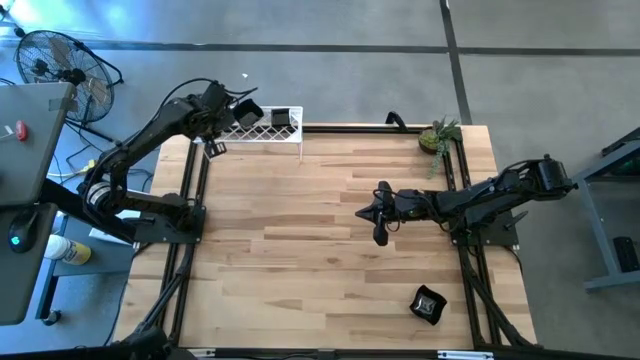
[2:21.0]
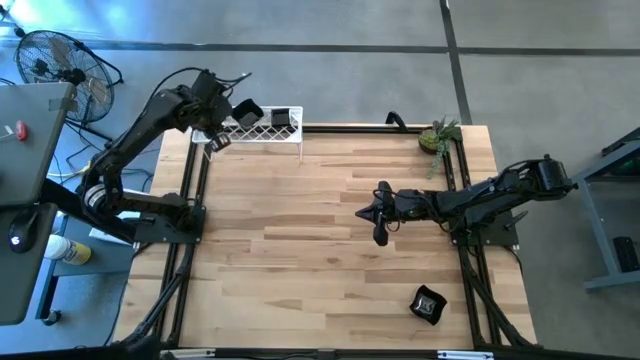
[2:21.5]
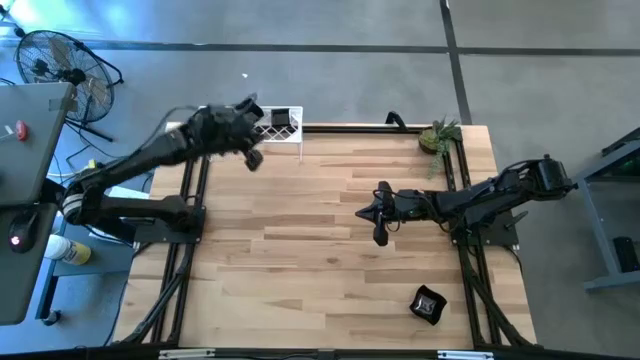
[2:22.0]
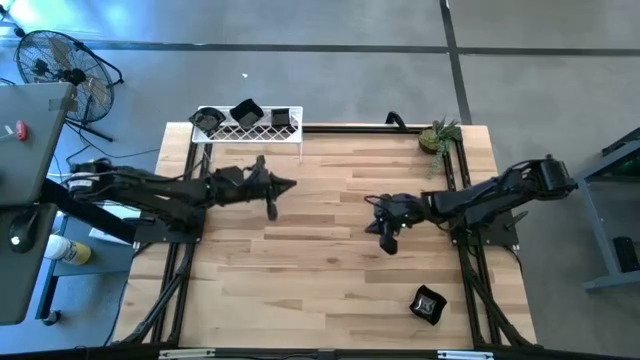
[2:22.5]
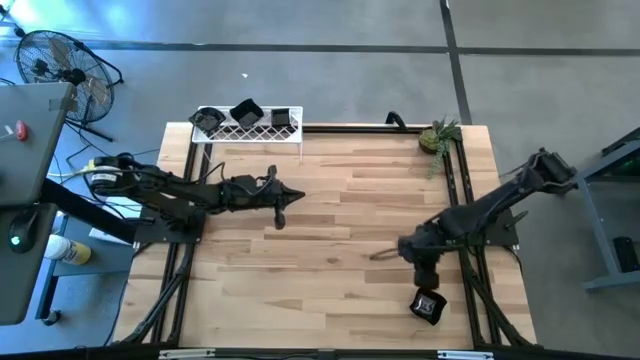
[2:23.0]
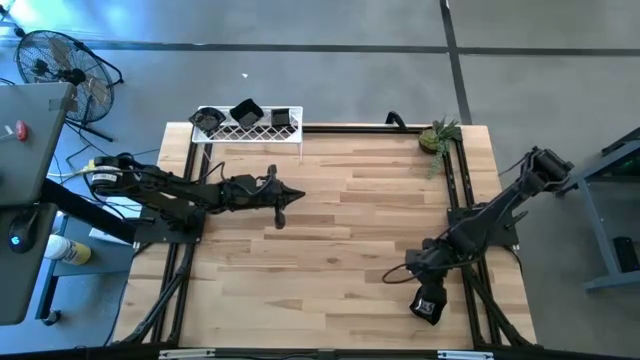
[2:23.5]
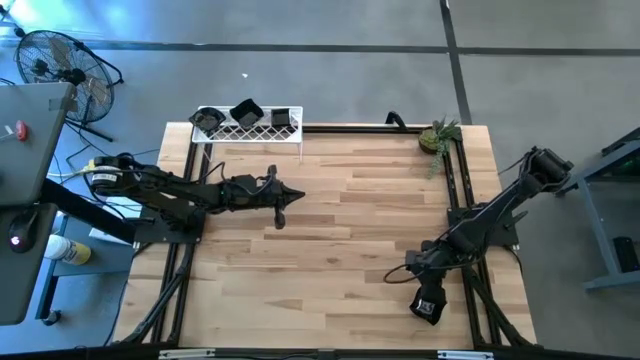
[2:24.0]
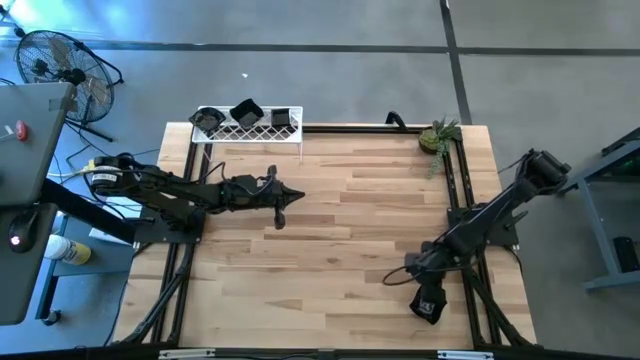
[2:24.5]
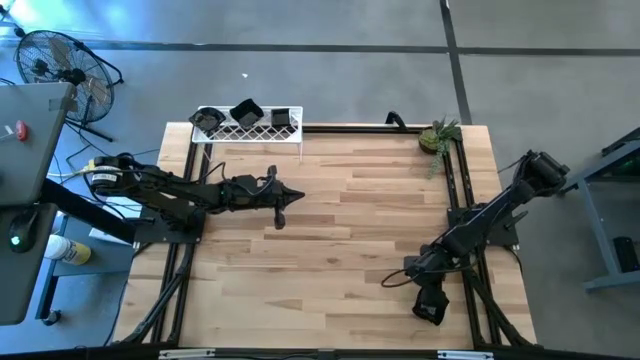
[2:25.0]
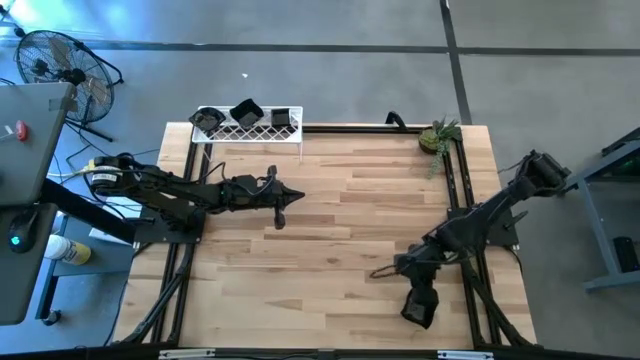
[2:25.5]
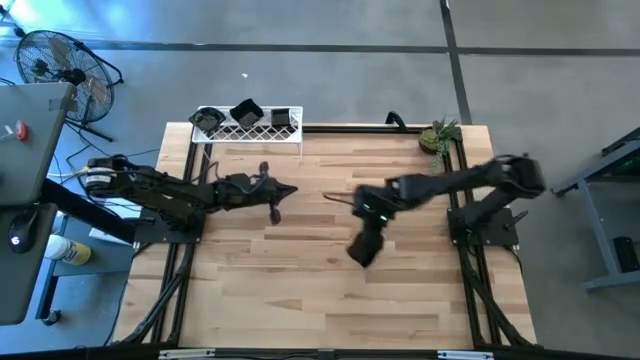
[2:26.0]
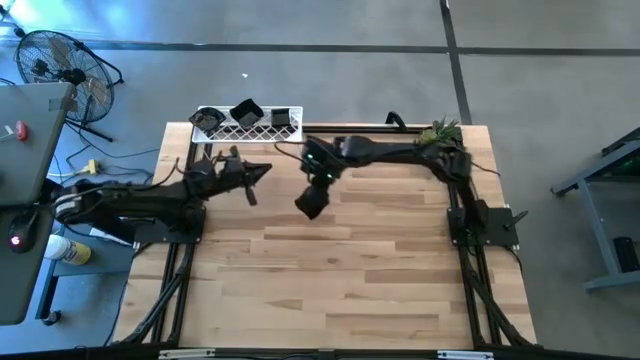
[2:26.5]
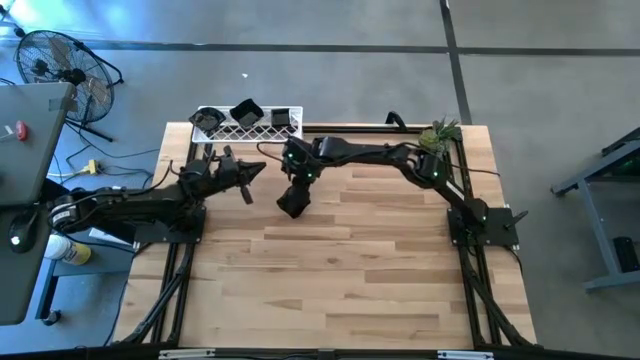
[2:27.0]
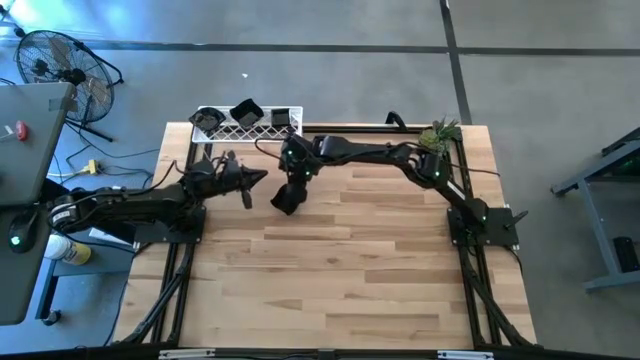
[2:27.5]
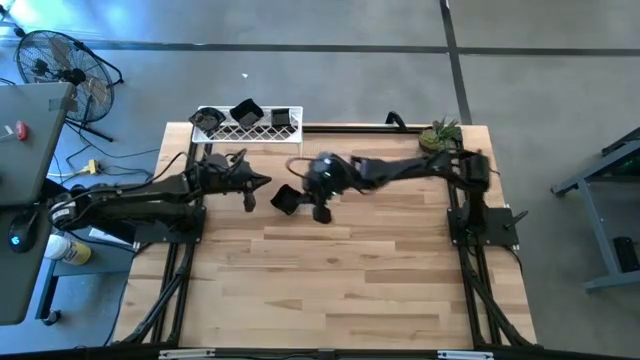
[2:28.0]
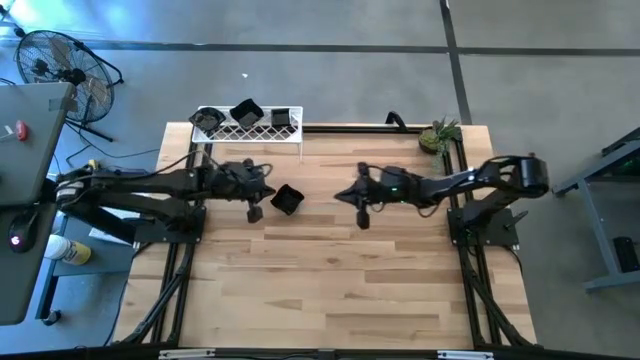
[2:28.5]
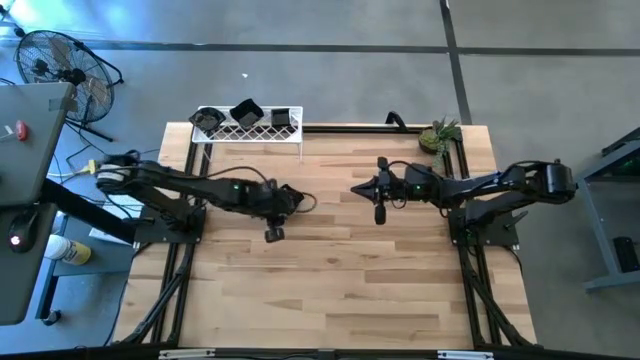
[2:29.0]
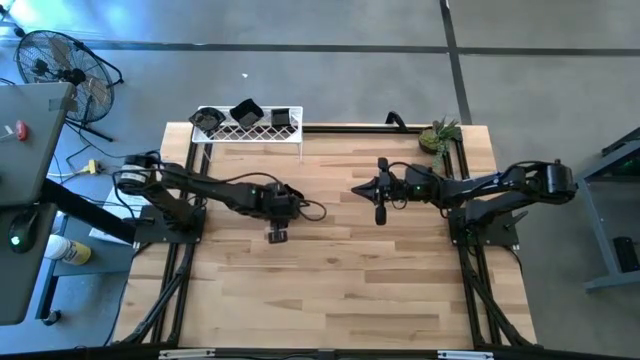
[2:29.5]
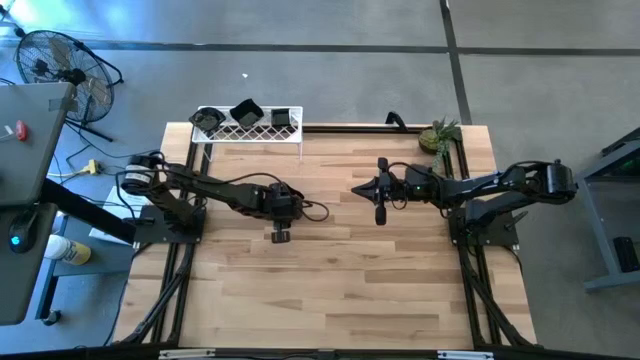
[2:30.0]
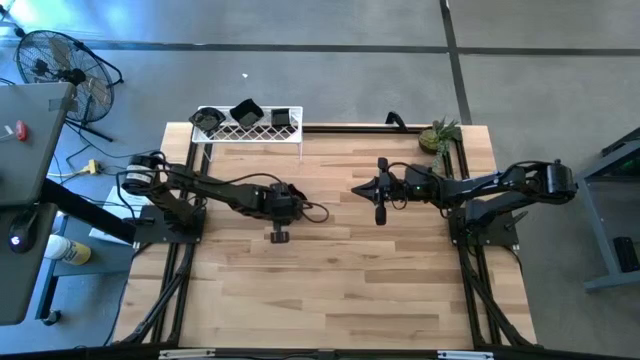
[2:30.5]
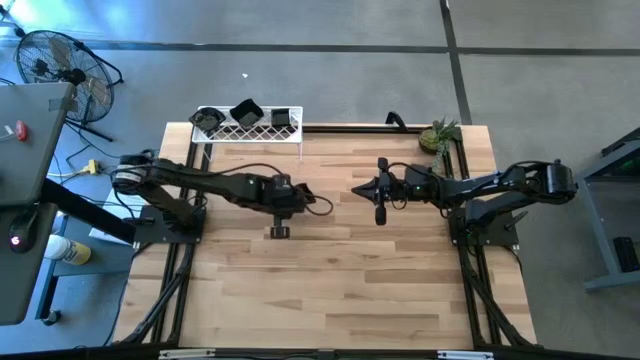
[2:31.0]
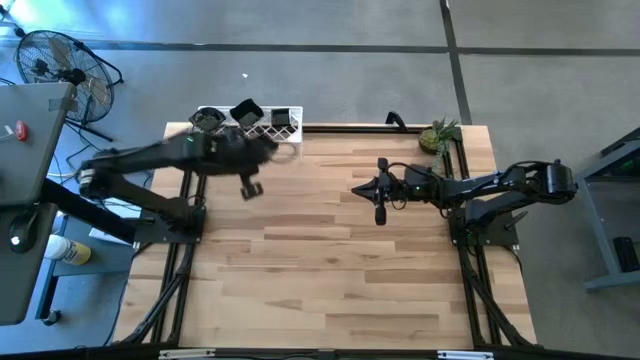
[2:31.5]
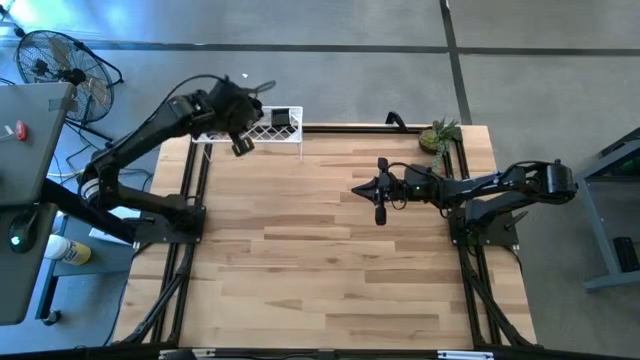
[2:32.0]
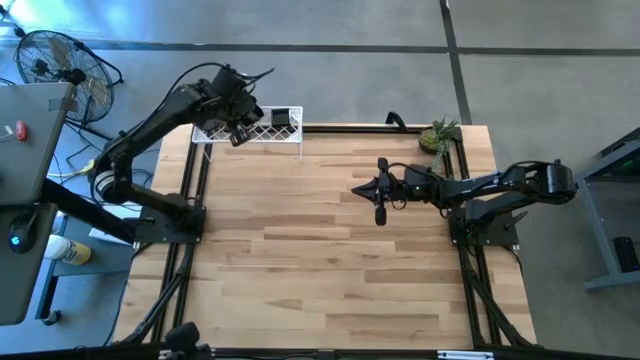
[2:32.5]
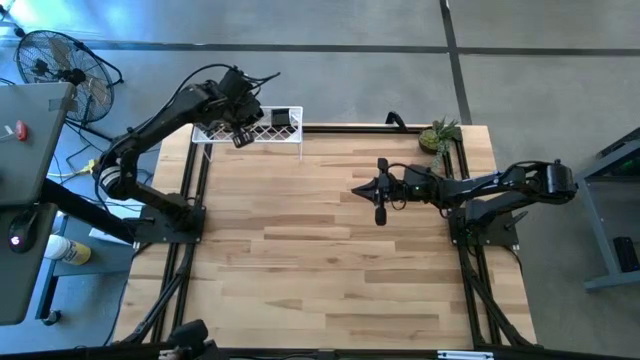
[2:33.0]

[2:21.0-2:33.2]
Task: Pick & Place Mini shaped plates
Stack the black distorted square plate on top of the black distorted square plate on the shelf

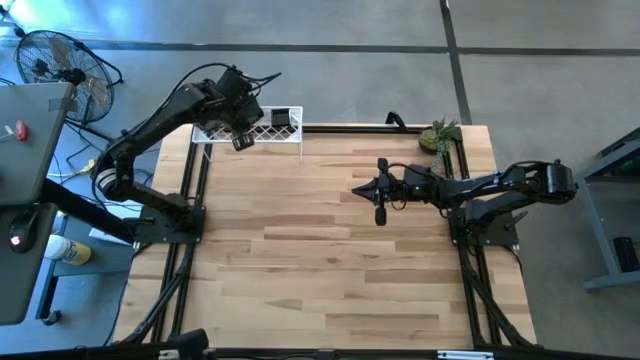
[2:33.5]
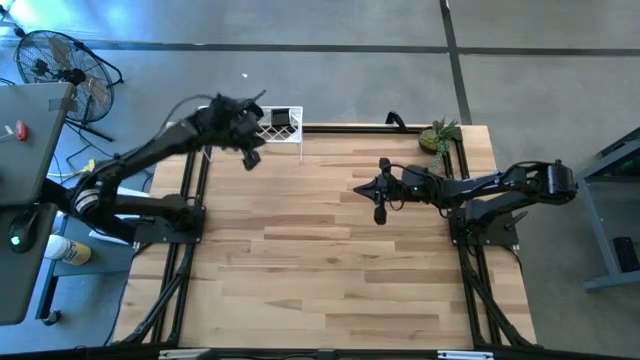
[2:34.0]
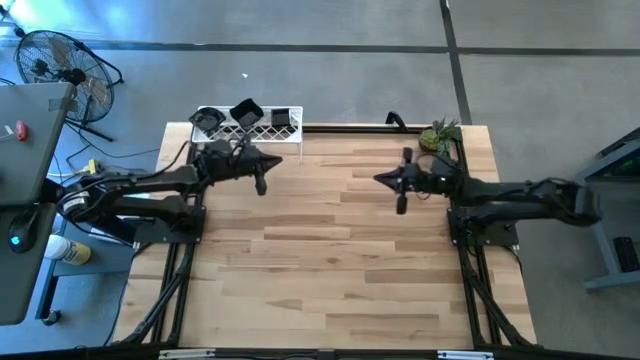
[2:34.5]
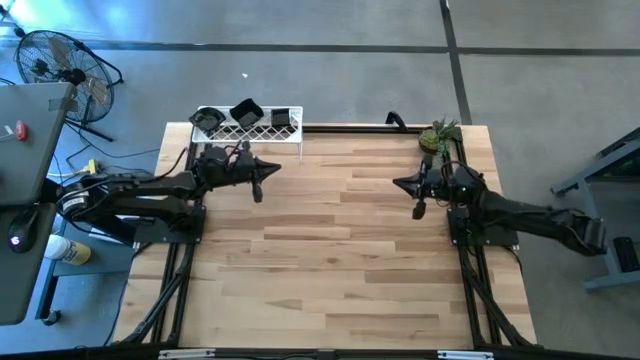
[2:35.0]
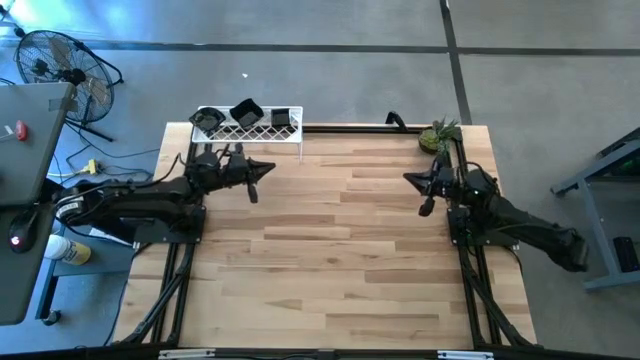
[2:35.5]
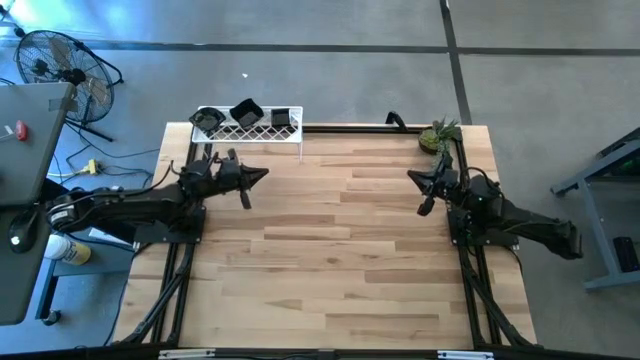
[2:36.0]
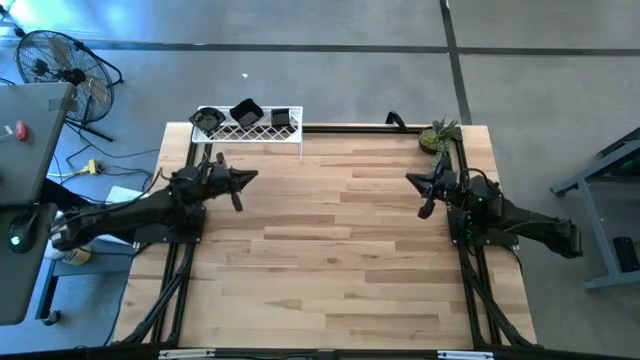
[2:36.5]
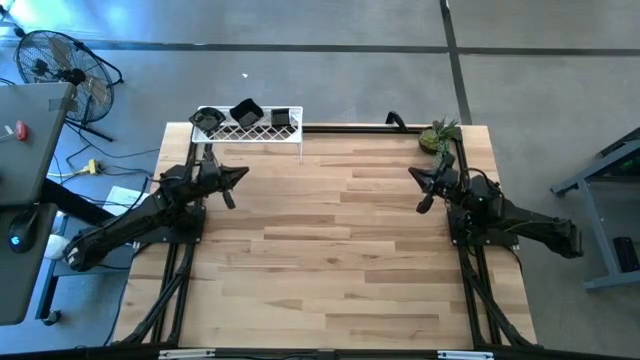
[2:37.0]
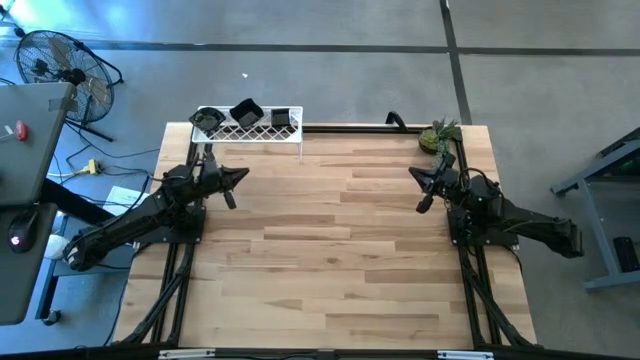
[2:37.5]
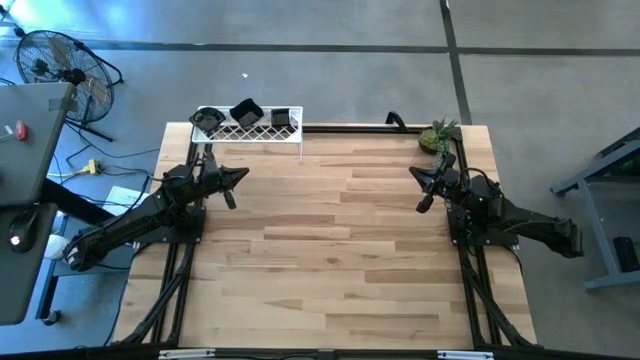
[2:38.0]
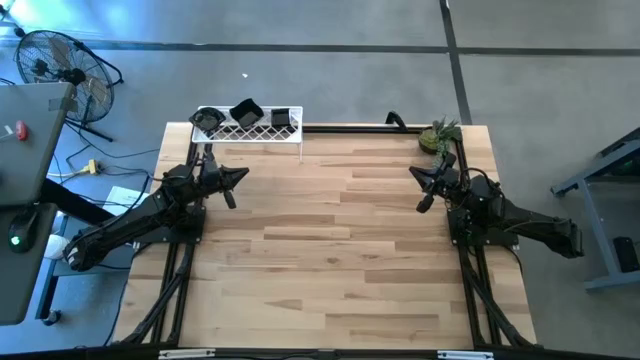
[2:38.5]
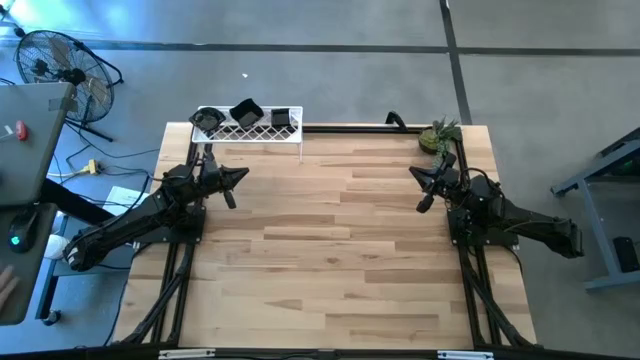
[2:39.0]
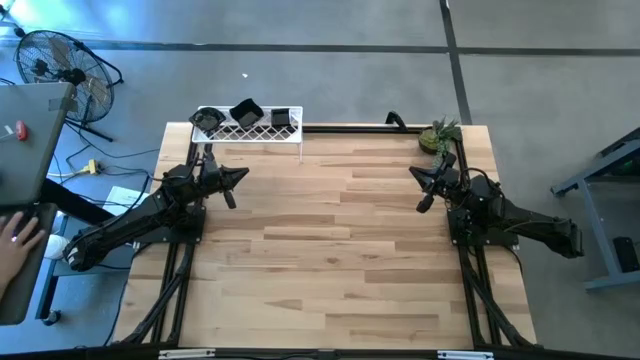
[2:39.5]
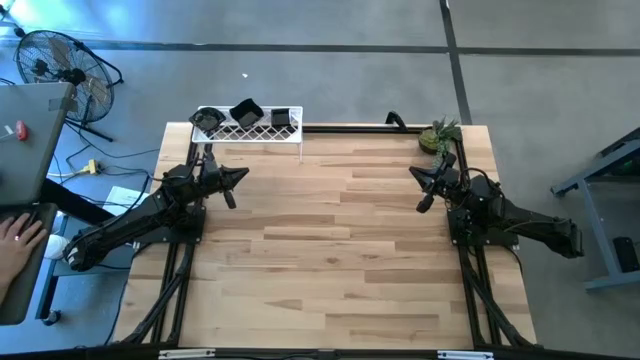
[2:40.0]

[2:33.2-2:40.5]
Return to Home Position
